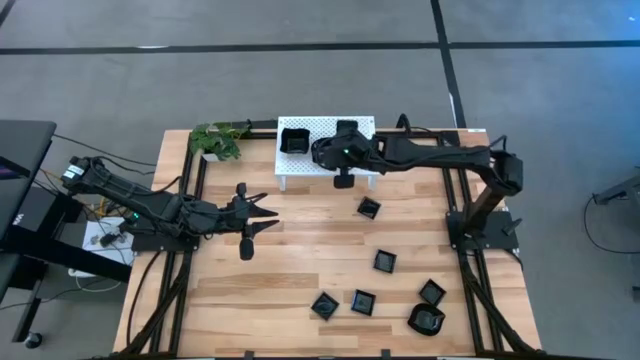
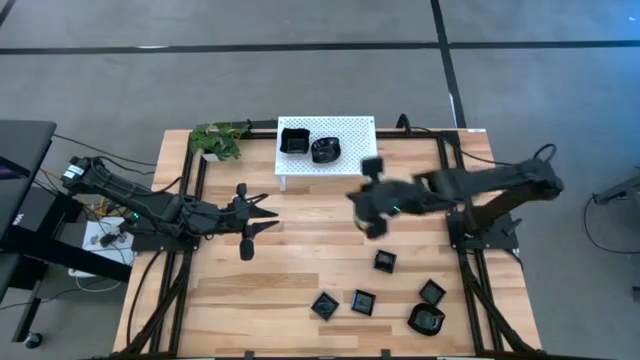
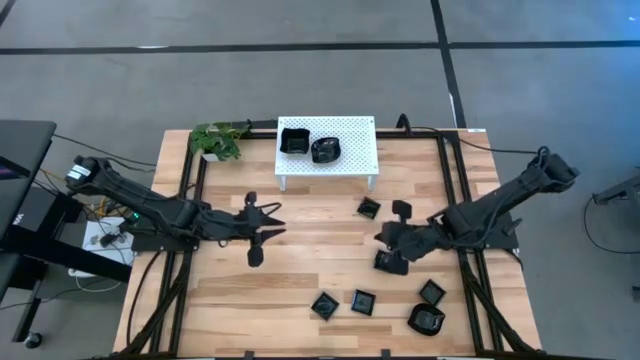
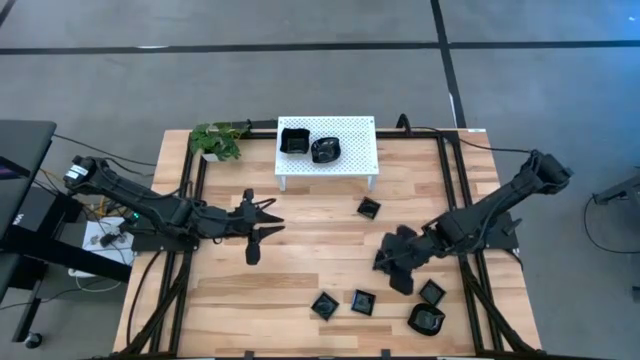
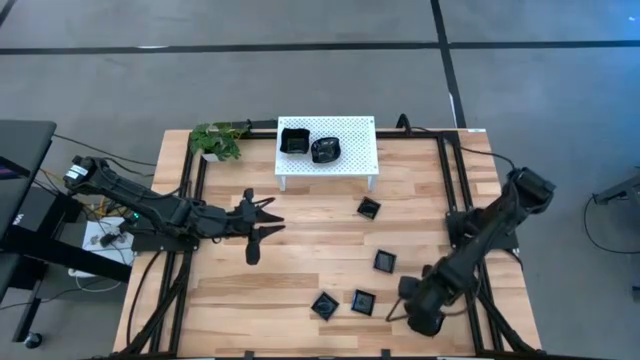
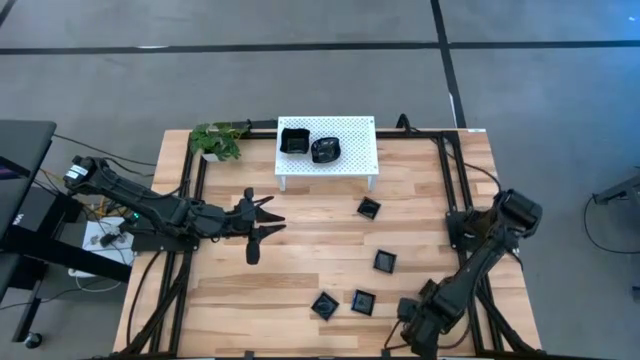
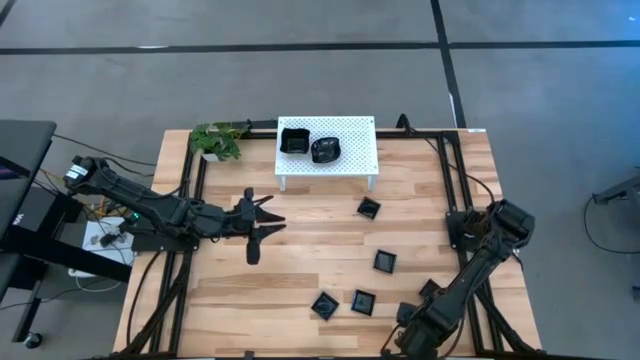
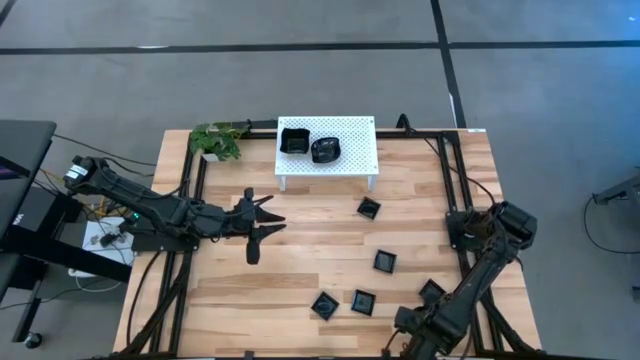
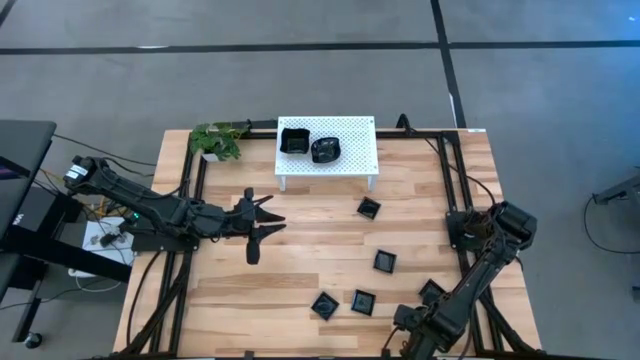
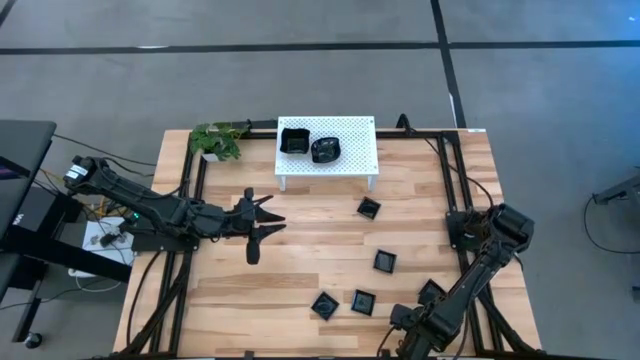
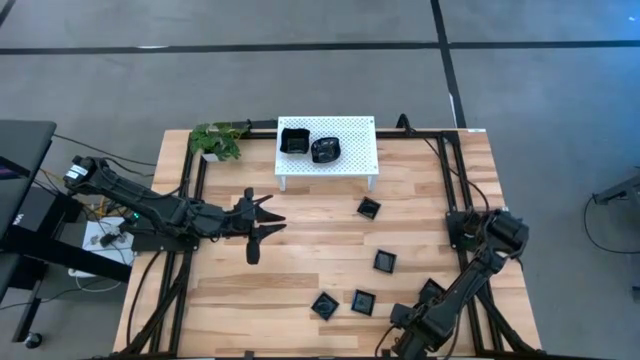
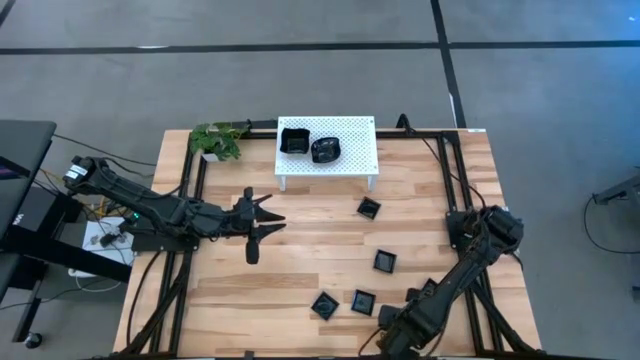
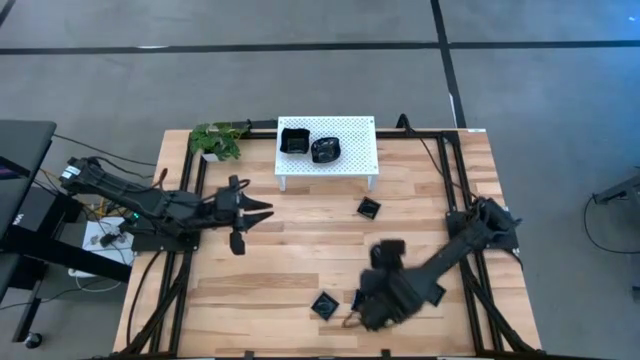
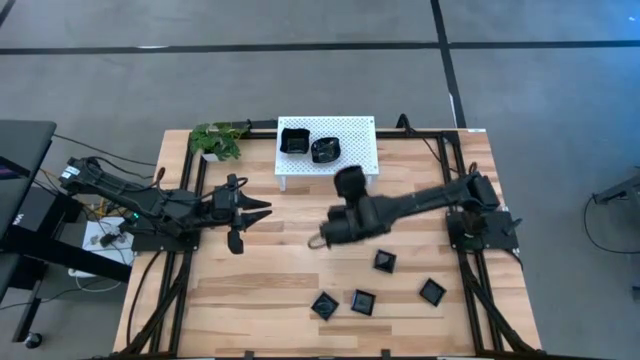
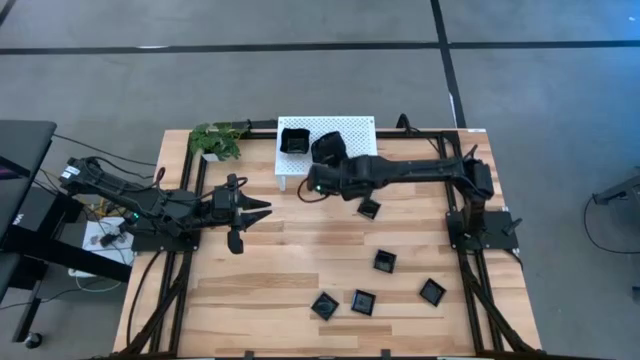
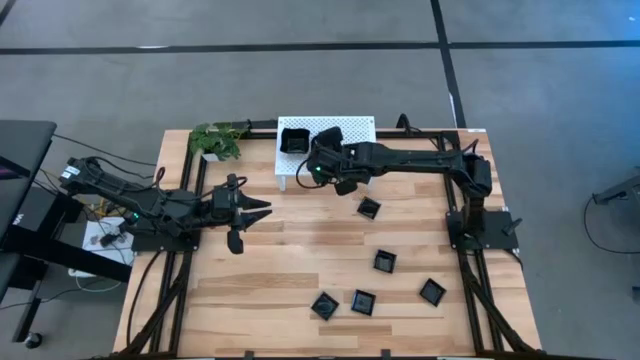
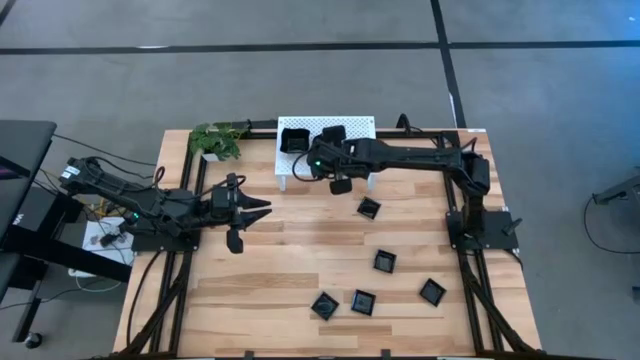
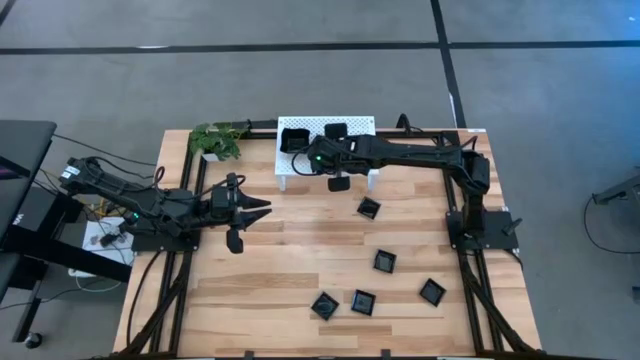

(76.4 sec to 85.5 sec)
Task: Pick & Place Mini shaped plates
Stack the black leaf-shaped plate on top of the black leaf-shaped plates on the shelf

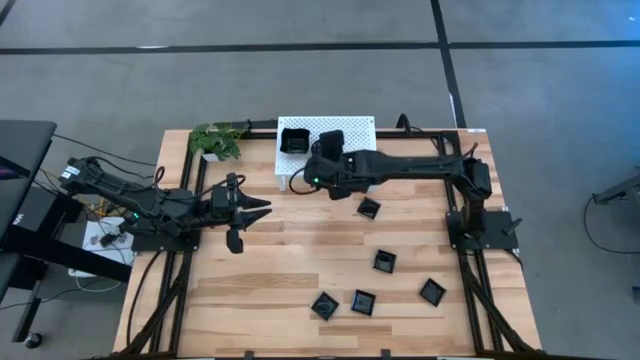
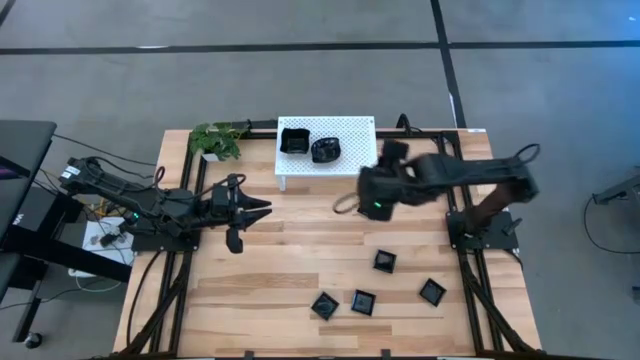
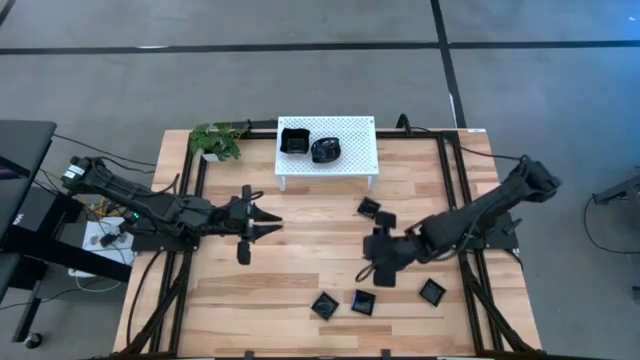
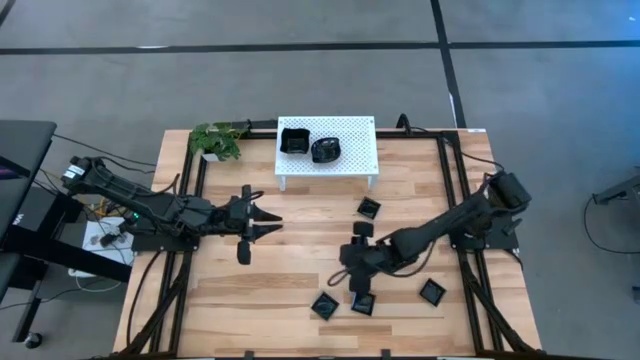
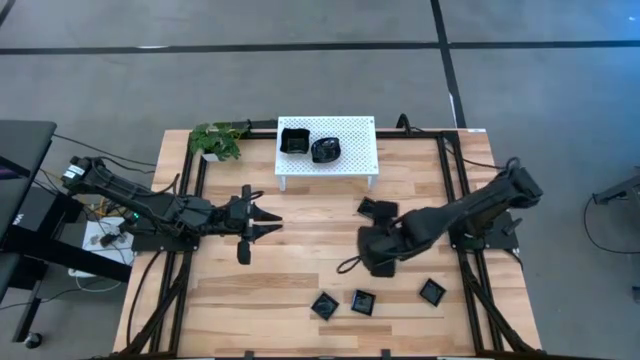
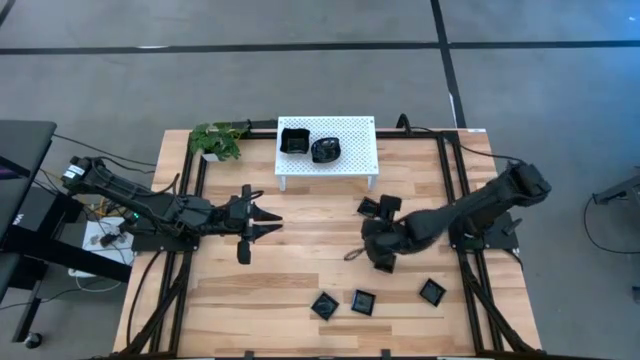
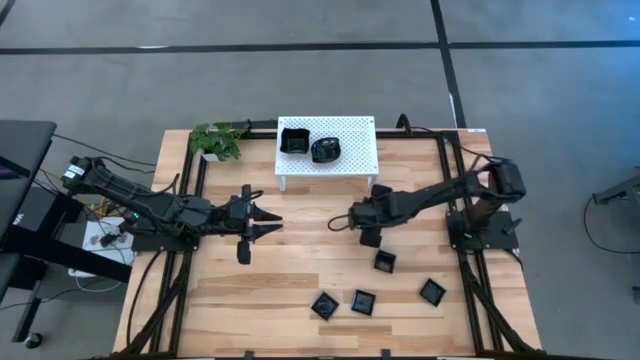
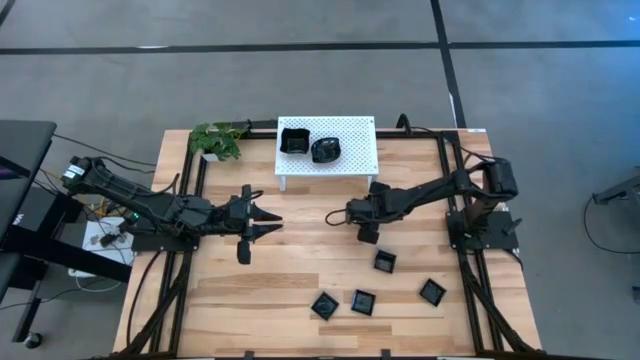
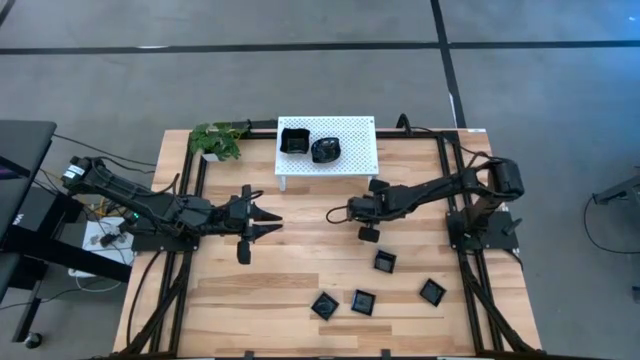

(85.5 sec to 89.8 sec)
Put the black square plate on the shelf

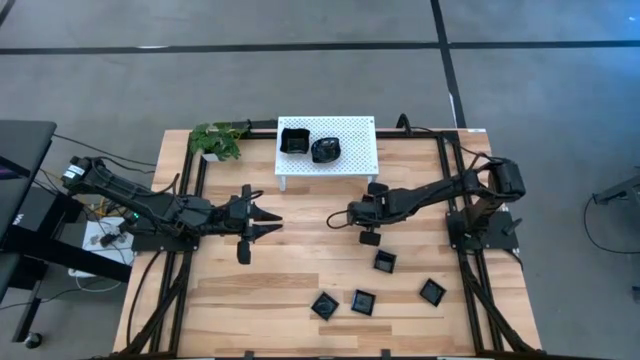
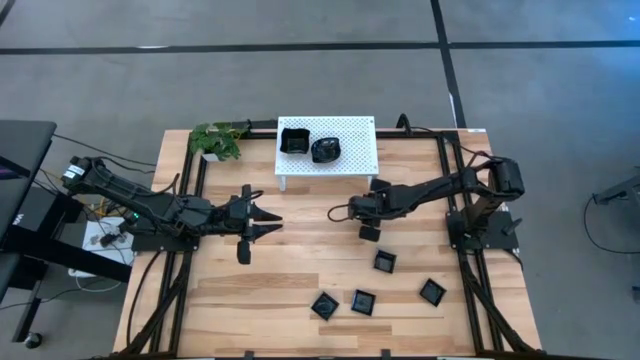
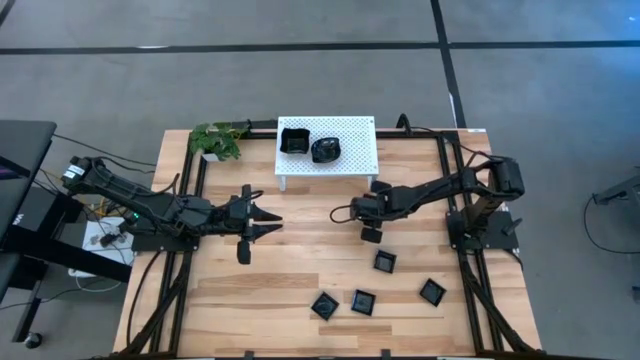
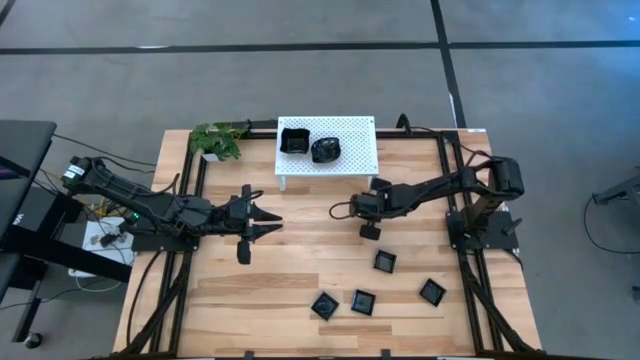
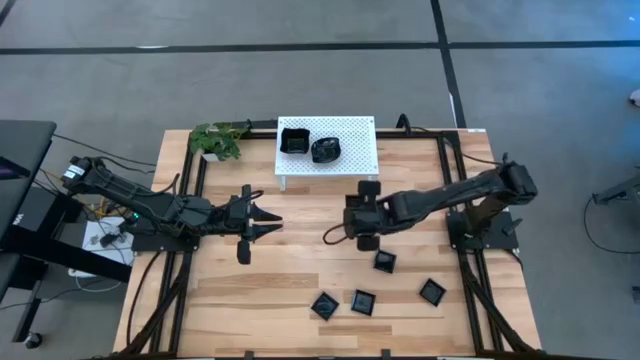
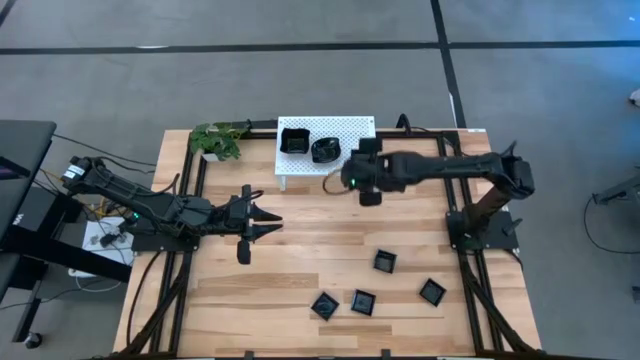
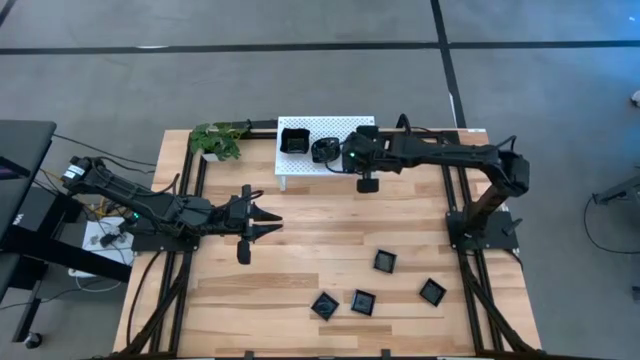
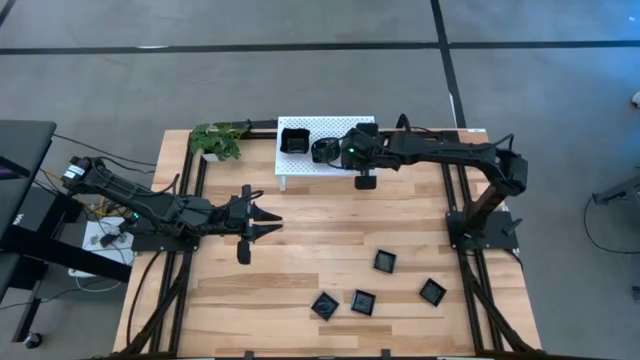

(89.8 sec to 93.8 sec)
Put the black square plate on the shelf

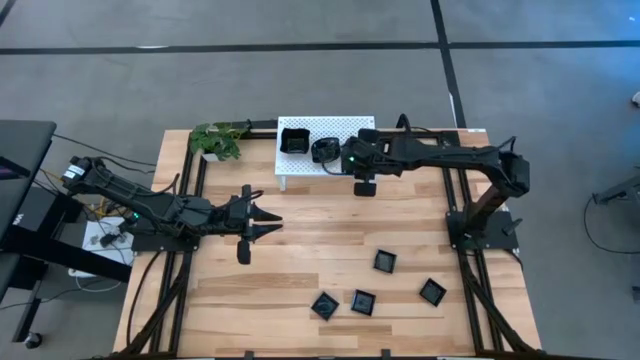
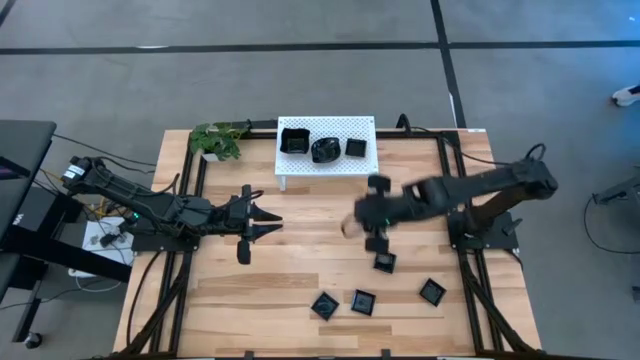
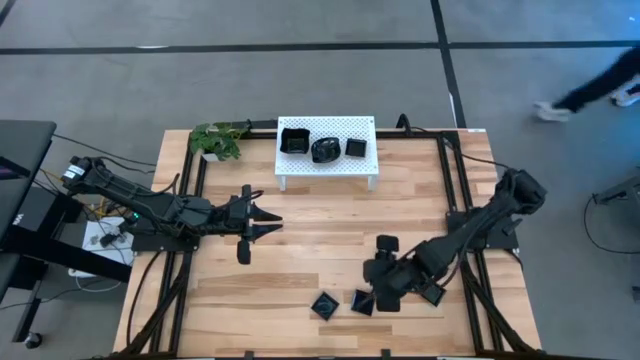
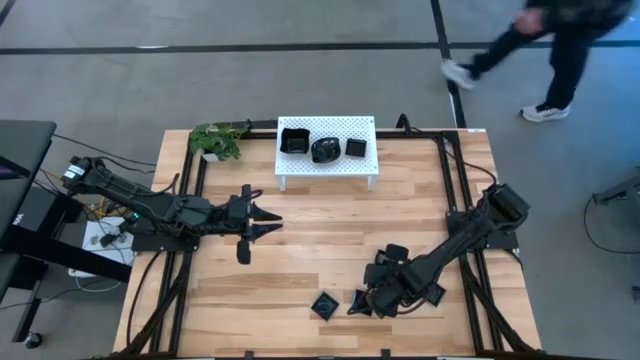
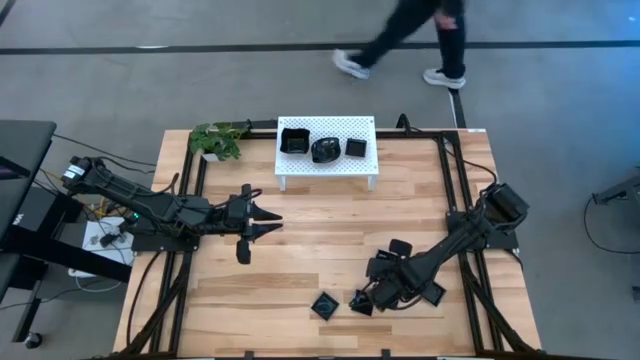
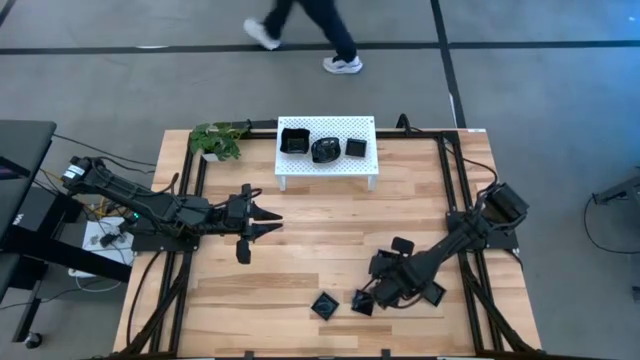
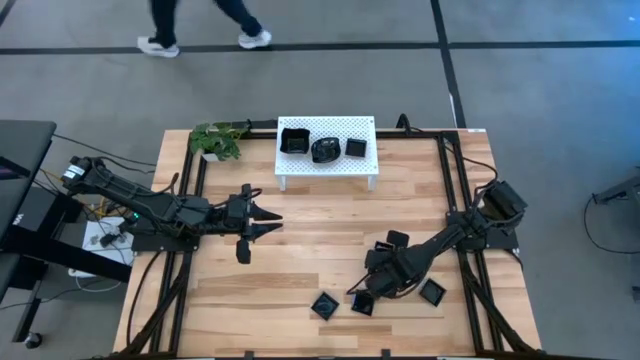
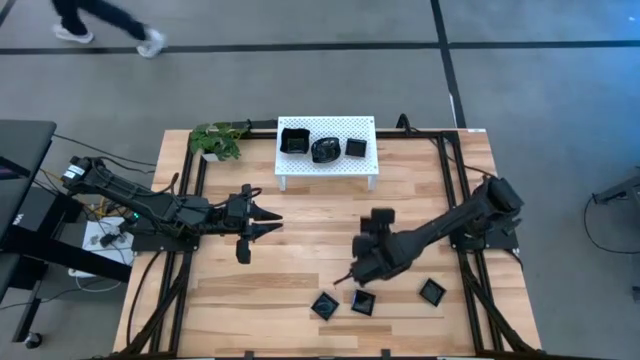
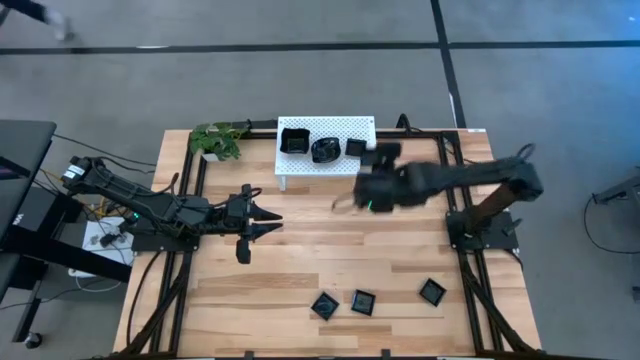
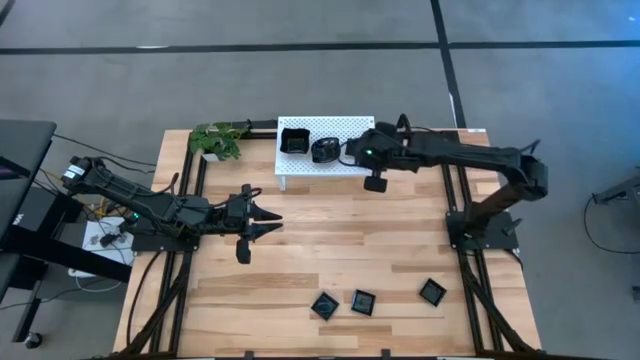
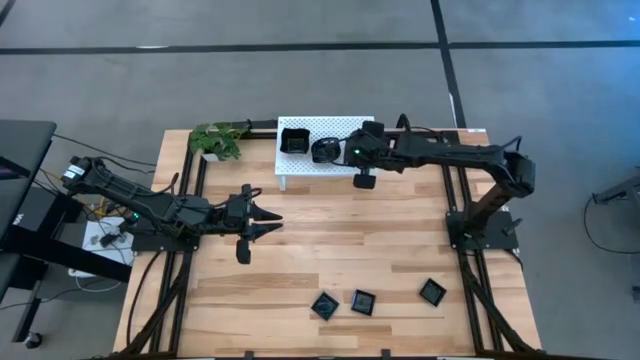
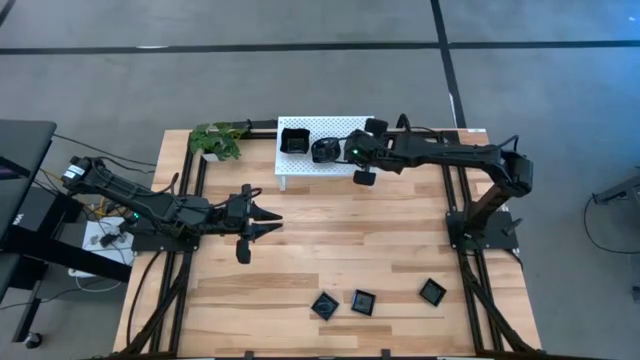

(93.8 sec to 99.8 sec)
Stack the black square plate on top of the black square plate on the shelf
